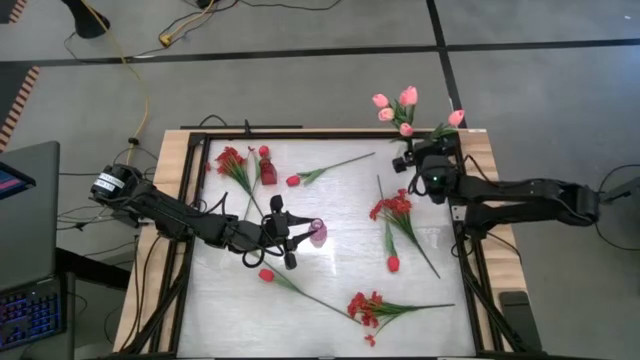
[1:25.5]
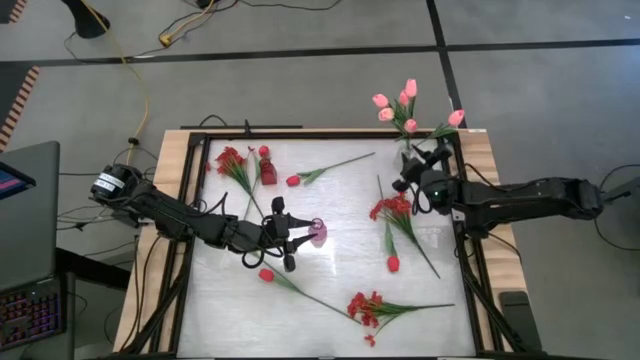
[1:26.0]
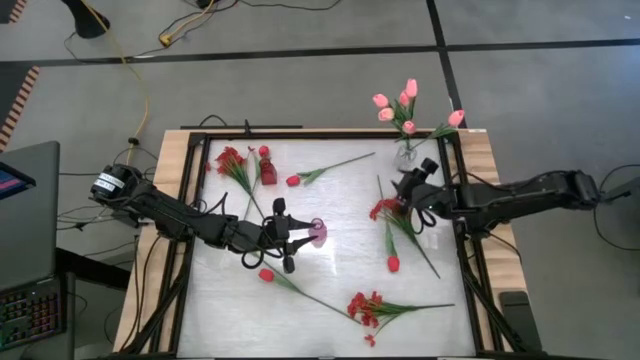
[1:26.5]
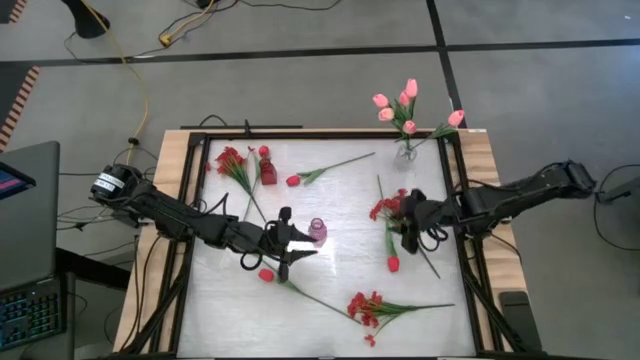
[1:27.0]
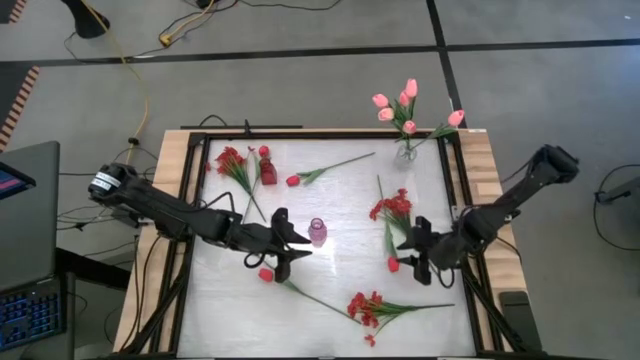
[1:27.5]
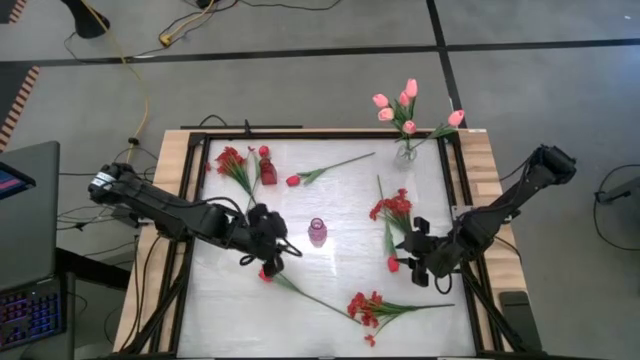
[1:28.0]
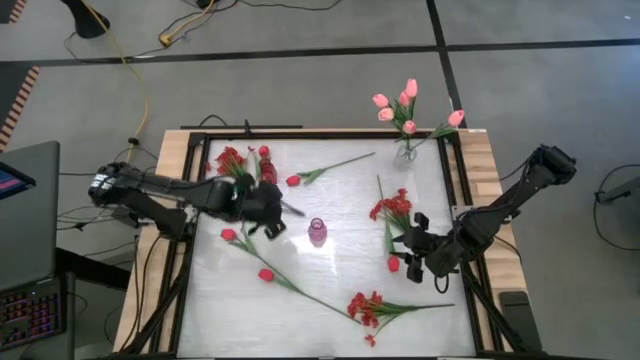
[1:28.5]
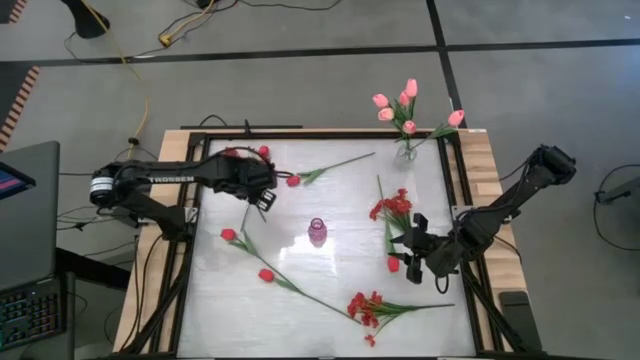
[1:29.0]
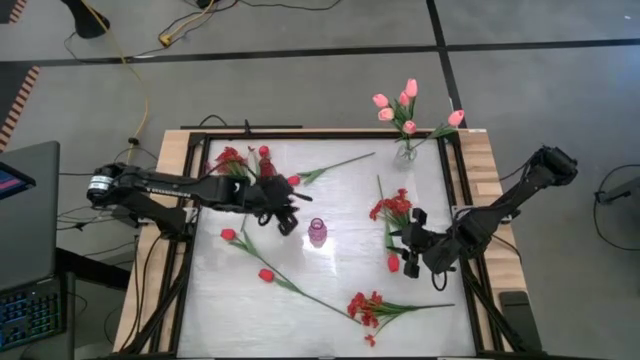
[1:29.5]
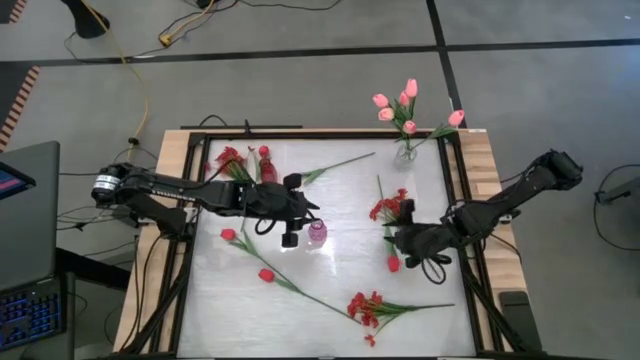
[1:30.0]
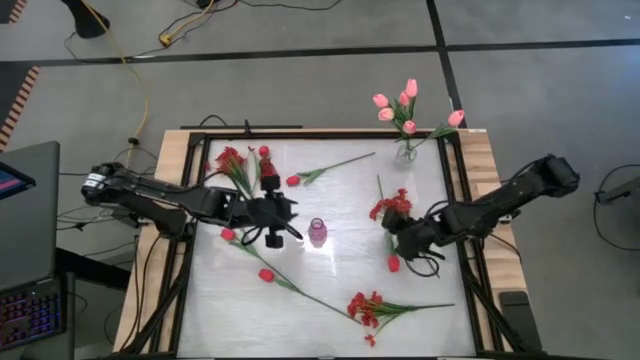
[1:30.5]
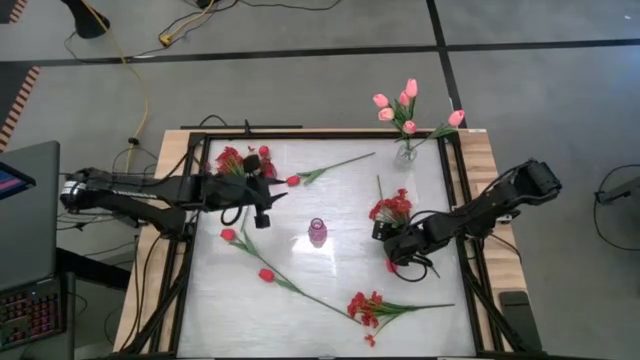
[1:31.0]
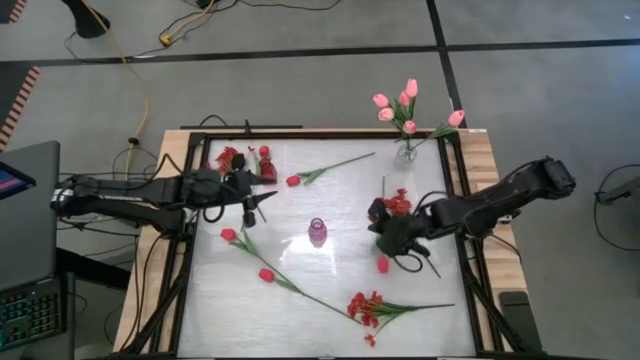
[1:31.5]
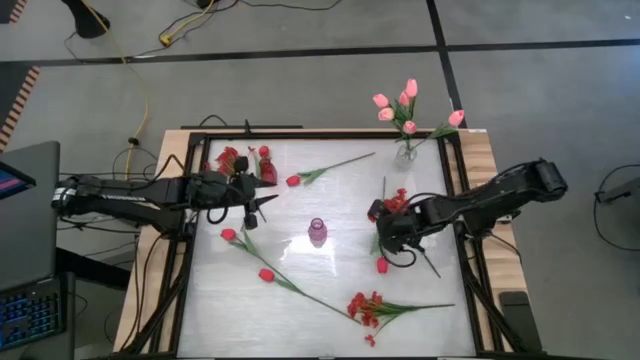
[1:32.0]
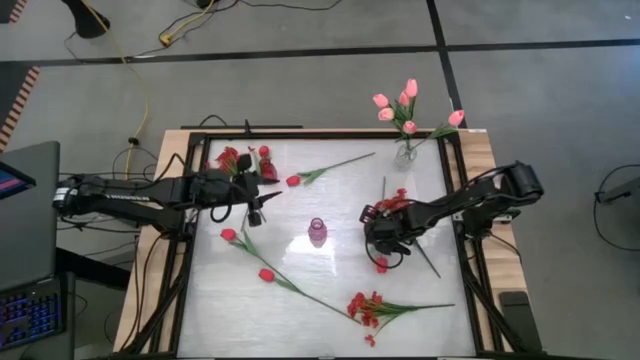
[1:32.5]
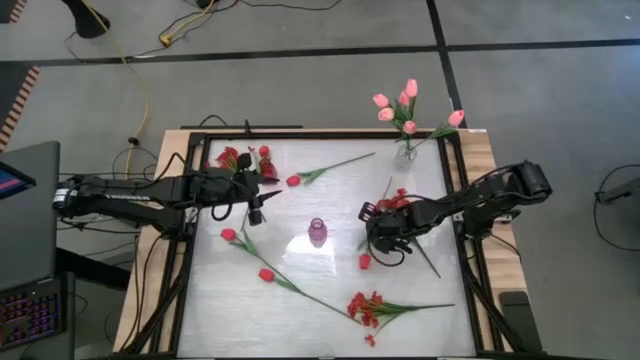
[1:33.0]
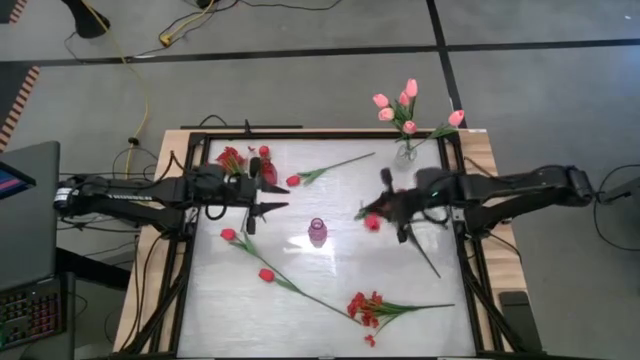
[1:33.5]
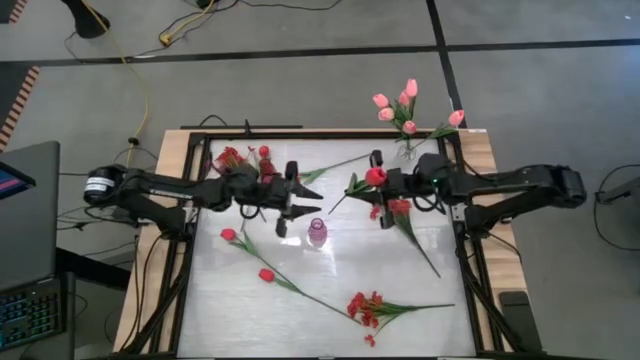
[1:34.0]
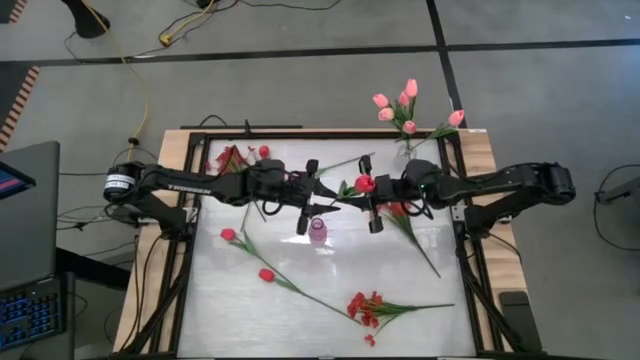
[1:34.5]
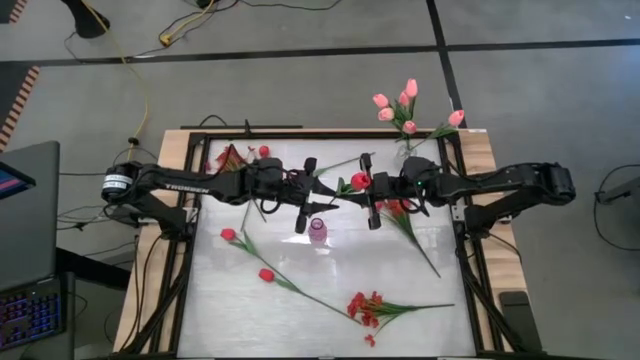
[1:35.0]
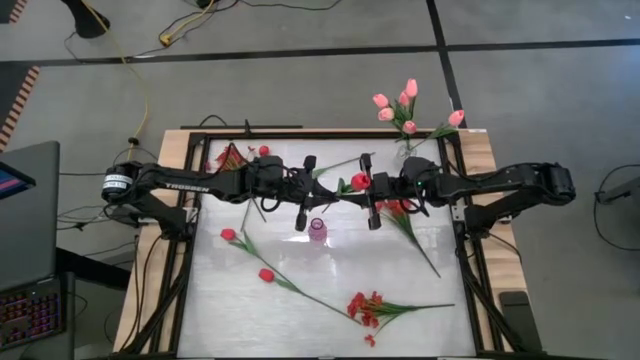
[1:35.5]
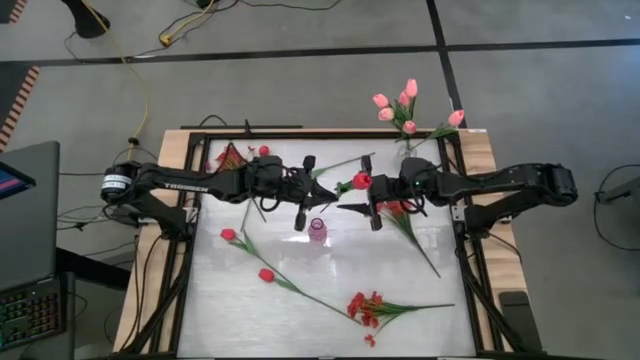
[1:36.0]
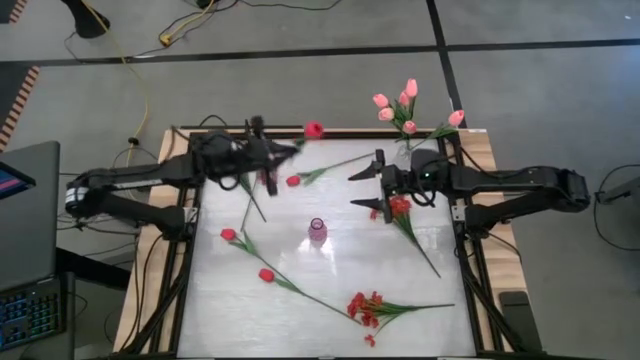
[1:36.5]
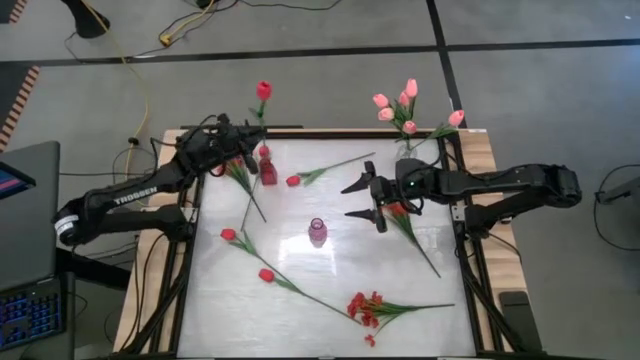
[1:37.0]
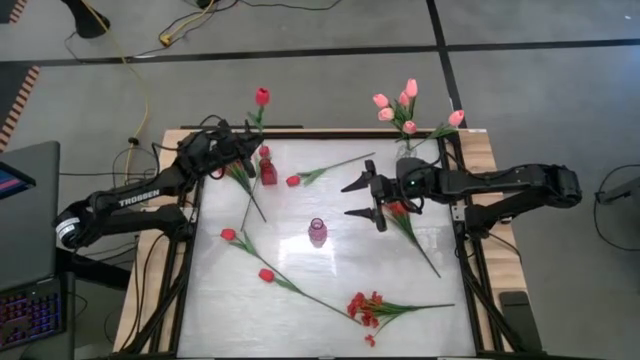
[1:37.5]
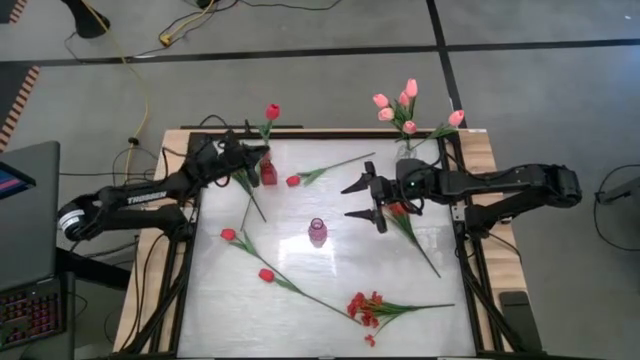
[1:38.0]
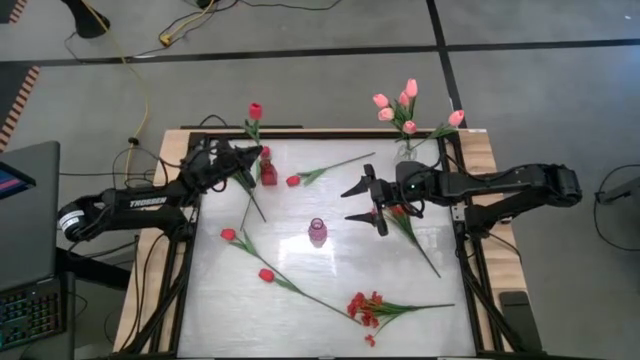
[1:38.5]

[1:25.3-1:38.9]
Task: Sort flowers into vase by color
Put the red flower into the red vase

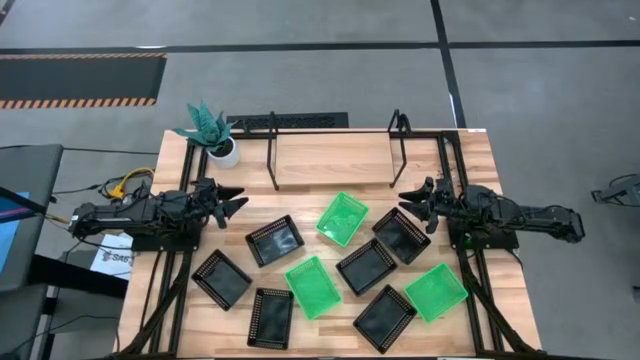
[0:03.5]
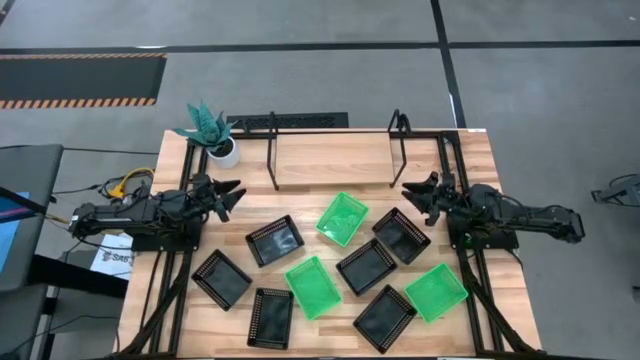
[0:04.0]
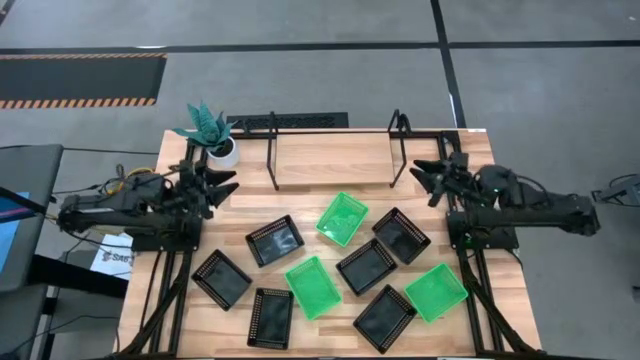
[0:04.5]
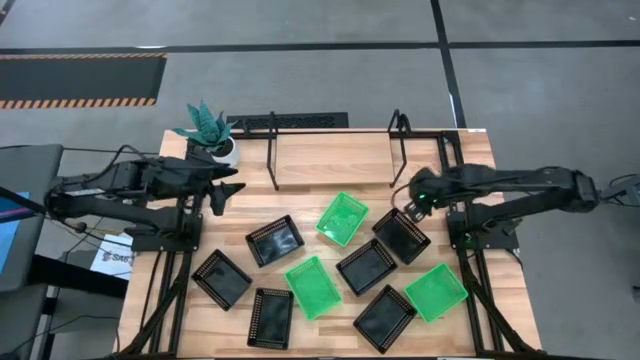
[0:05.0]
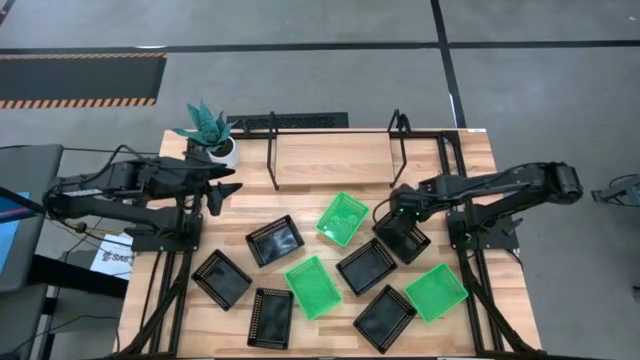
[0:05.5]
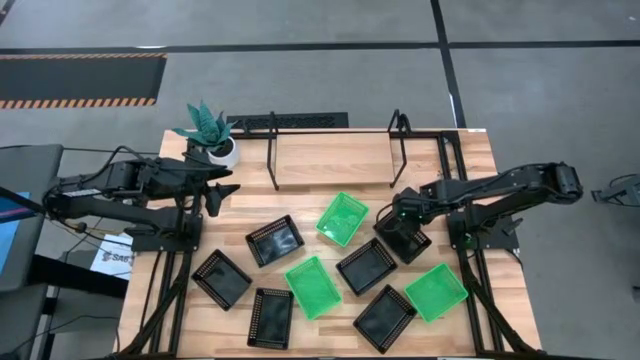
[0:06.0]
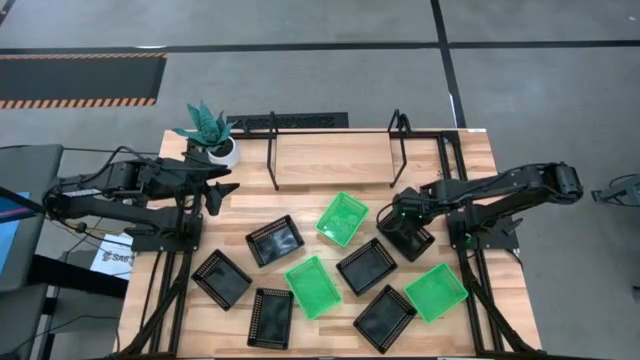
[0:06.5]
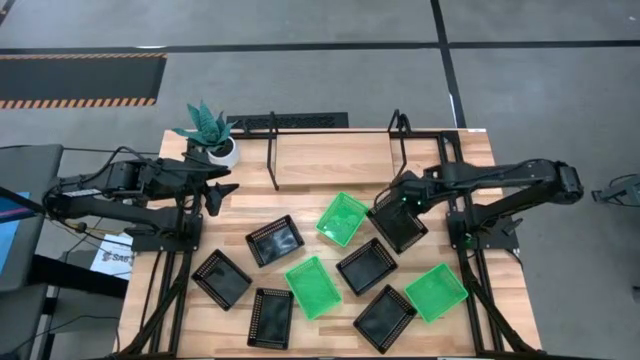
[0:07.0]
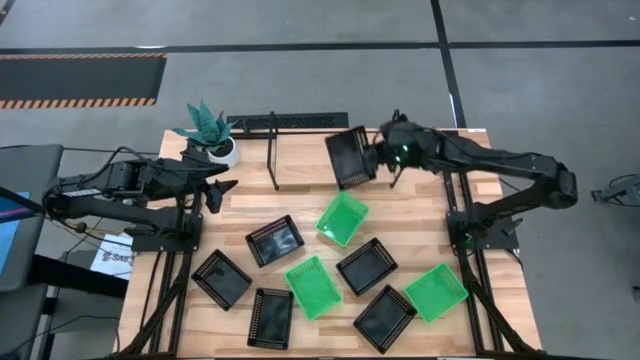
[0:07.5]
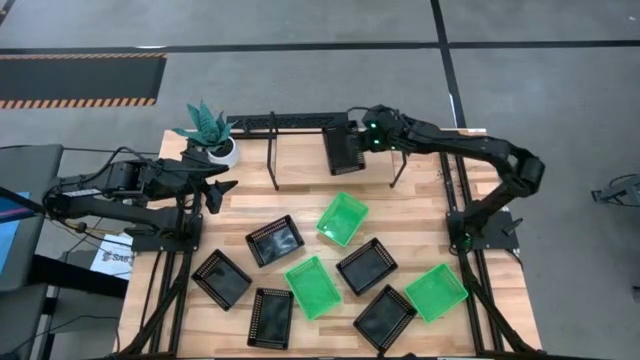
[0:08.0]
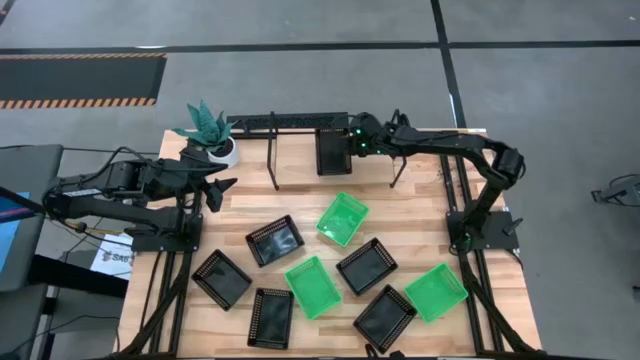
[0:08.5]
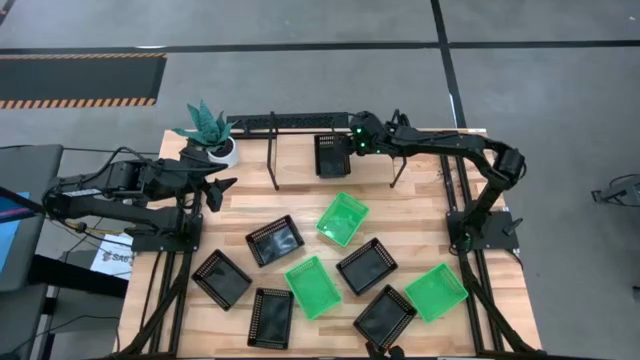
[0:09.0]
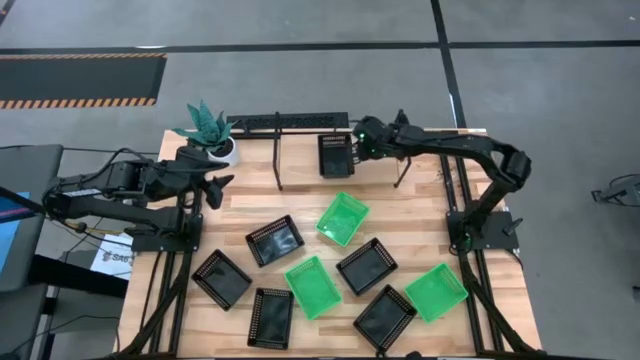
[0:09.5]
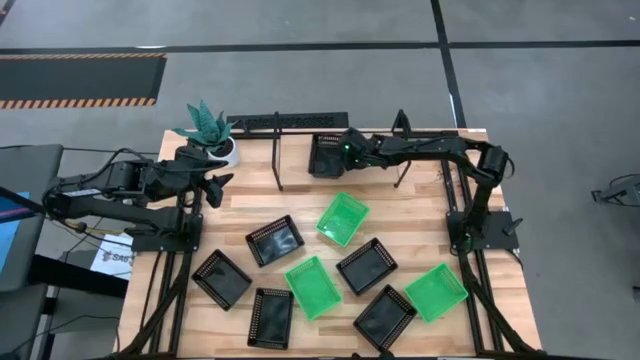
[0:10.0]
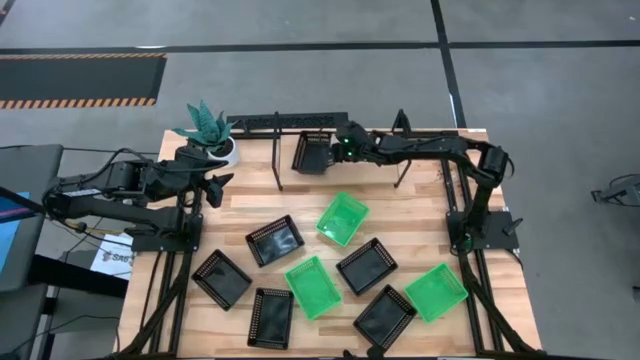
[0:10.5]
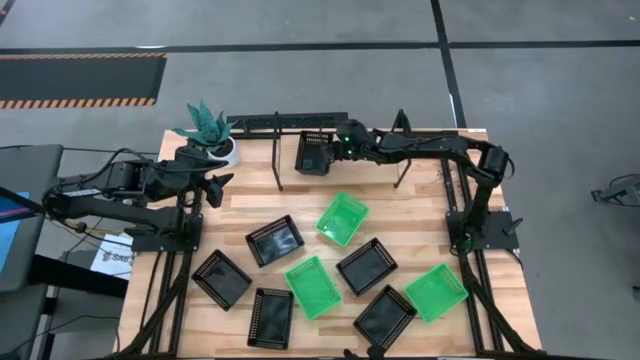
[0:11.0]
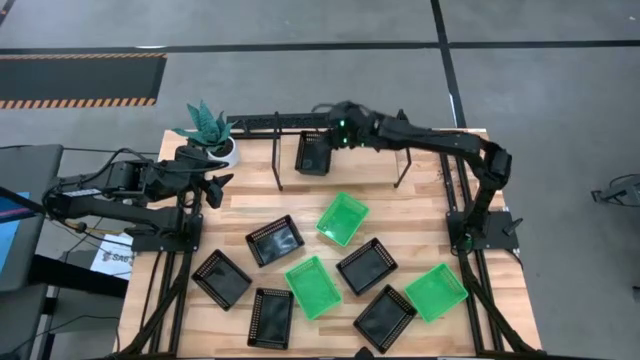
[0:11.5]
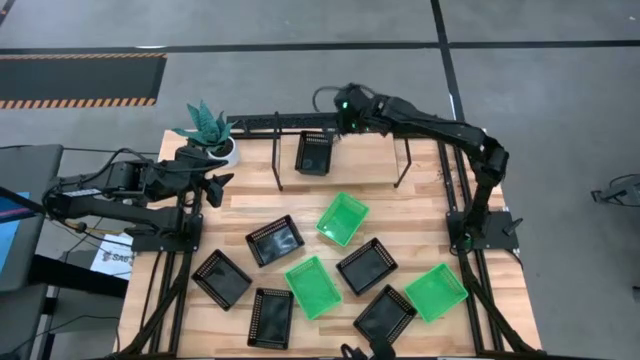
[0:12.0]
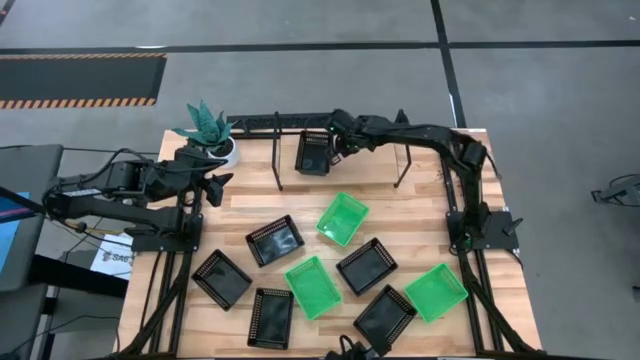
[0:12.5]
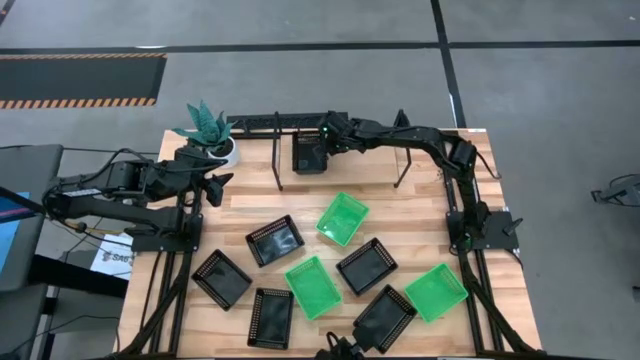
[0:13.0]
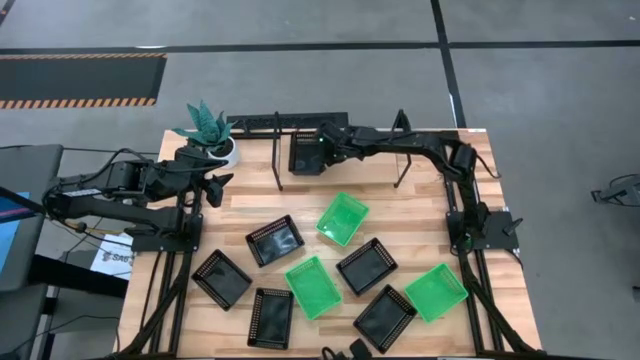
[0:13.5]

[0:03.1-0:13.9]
Task: Stack baskets on shelf by color
Put the black basket on the shelf
